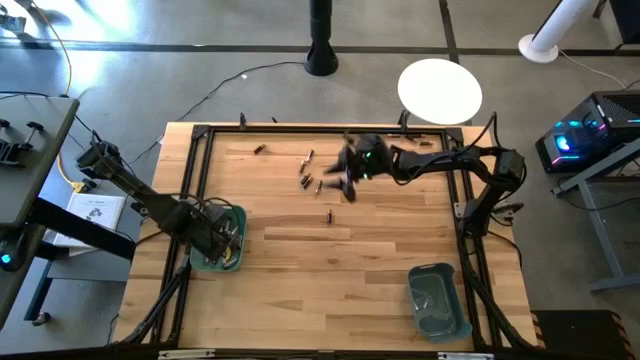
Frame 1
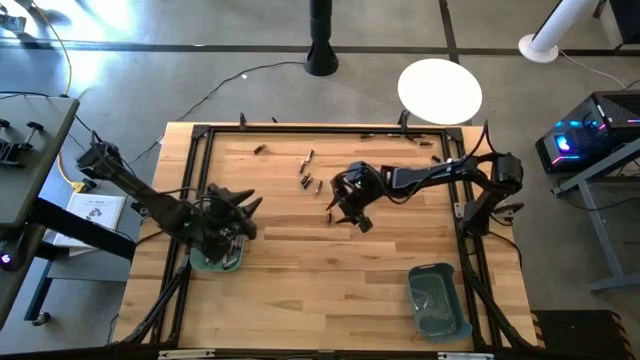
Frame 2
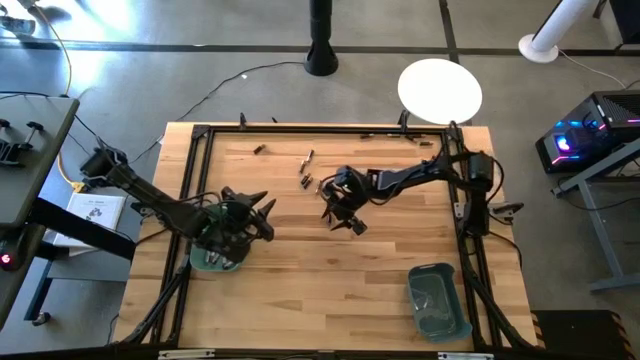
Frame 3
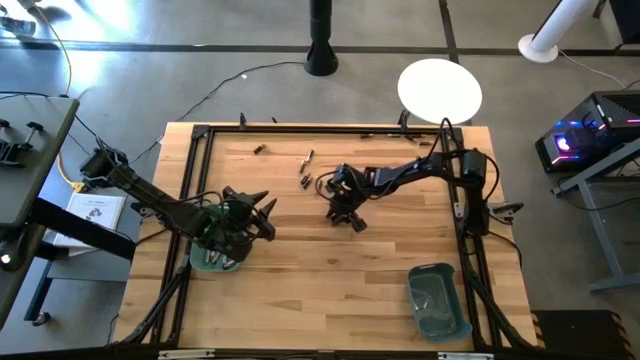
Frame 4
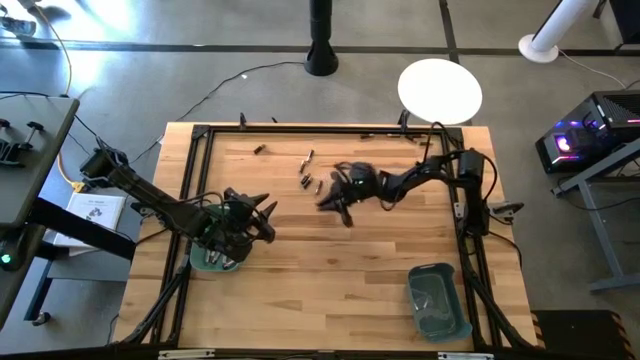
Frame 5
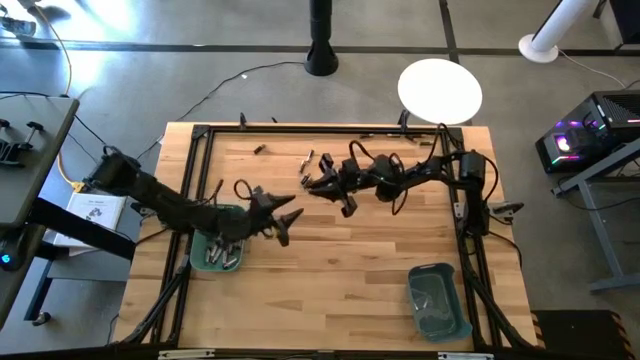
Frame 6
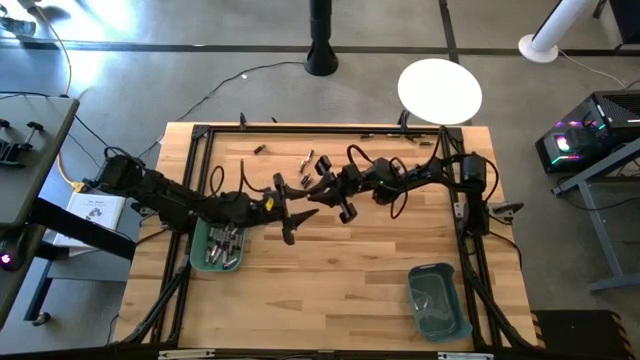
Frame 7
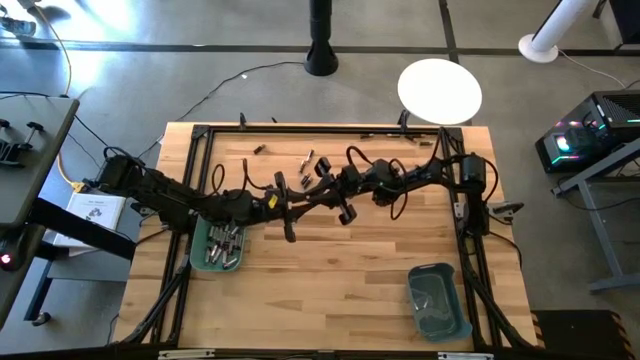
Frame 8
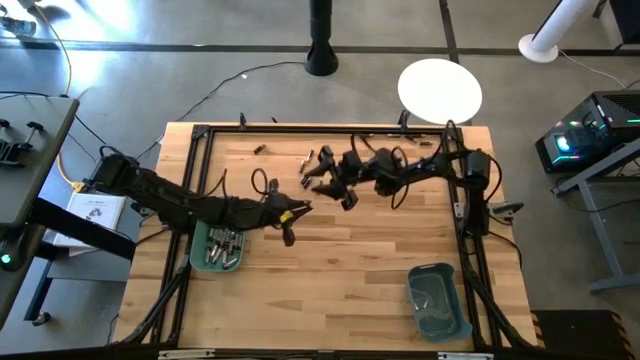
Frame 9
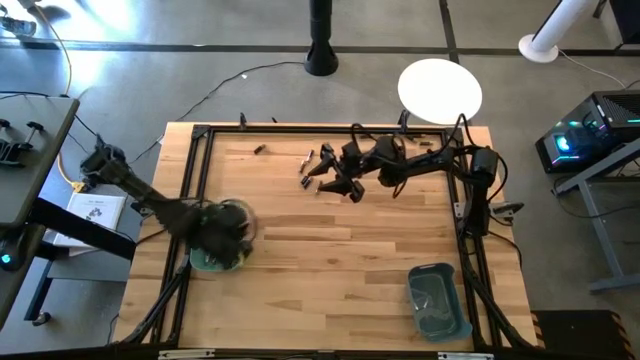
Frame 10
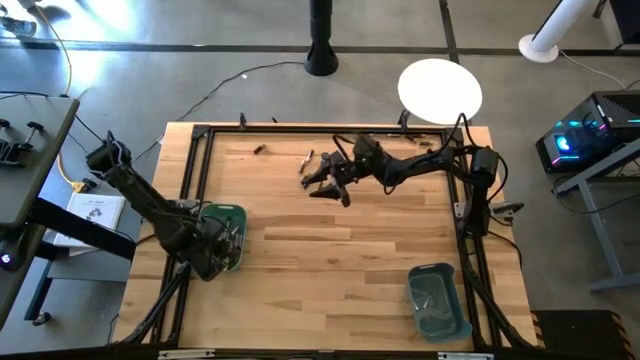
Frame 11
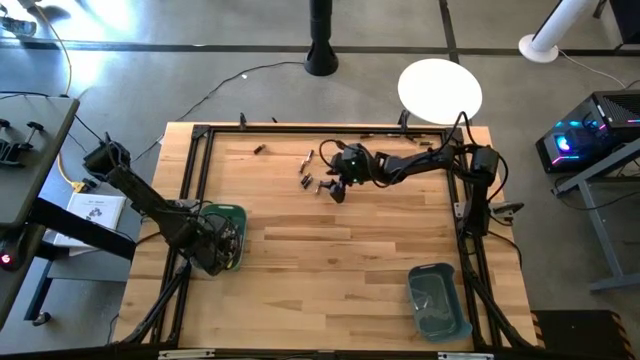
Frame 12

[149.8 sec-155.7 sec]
Task: Sort batteries
Put the black battery into the green bin

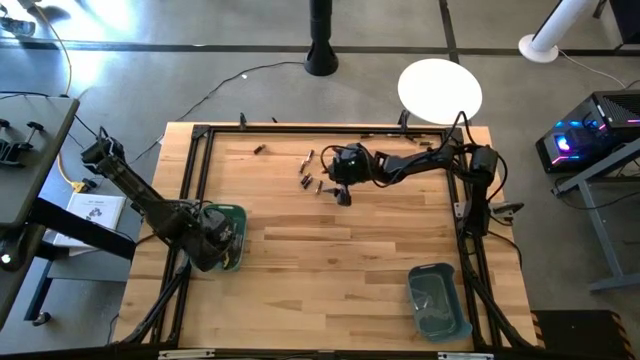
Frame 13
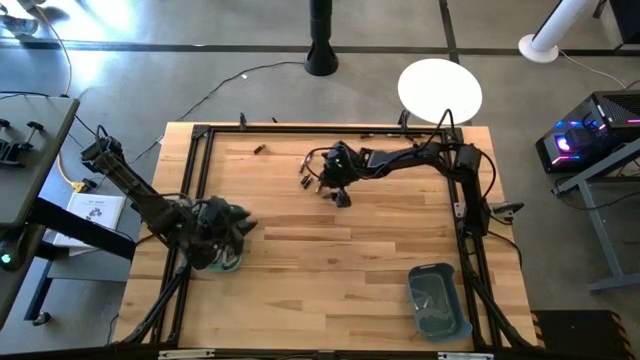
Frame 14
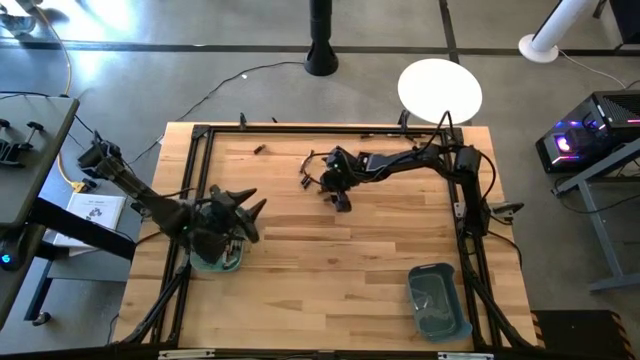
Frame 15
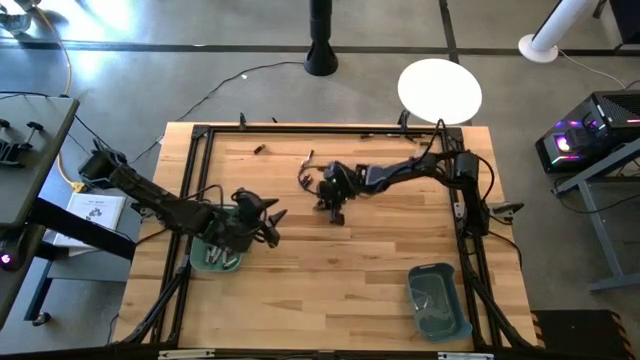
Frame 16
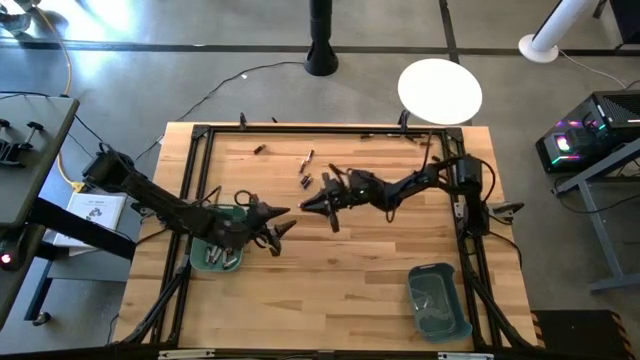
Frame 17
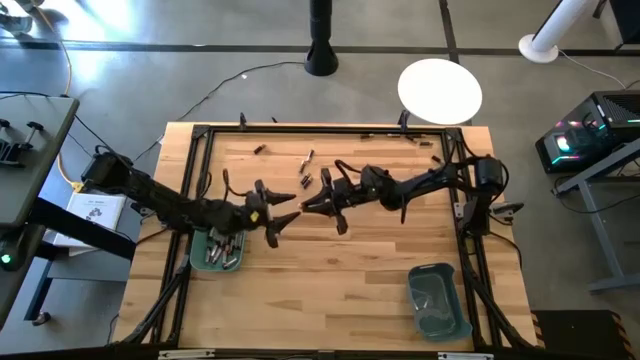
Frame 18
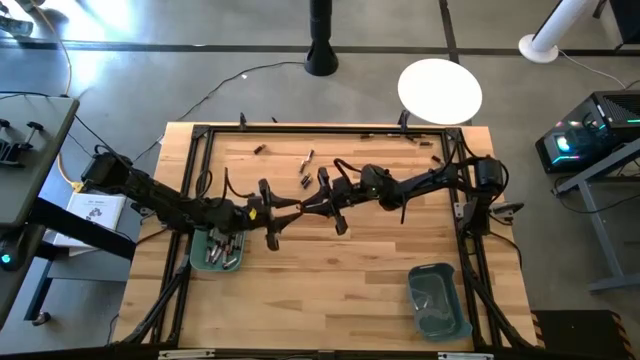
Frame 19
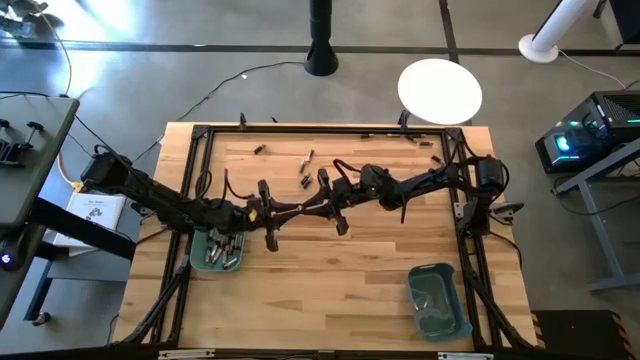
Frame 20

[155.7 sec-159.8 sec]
Put the black battery into the green bin

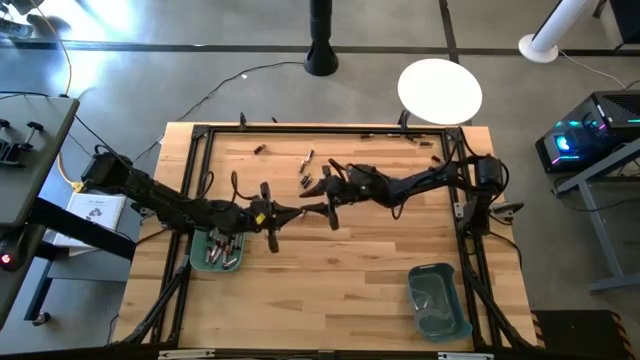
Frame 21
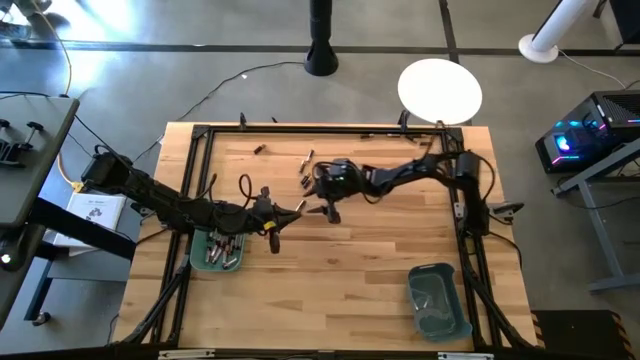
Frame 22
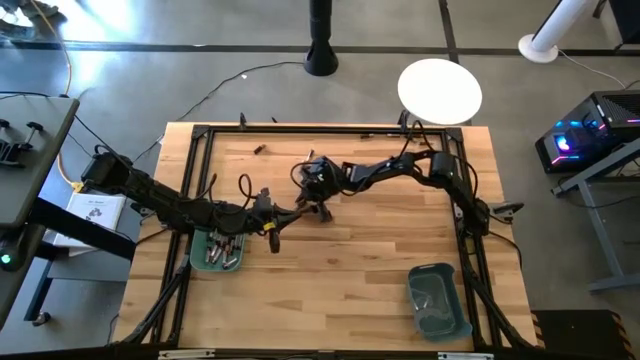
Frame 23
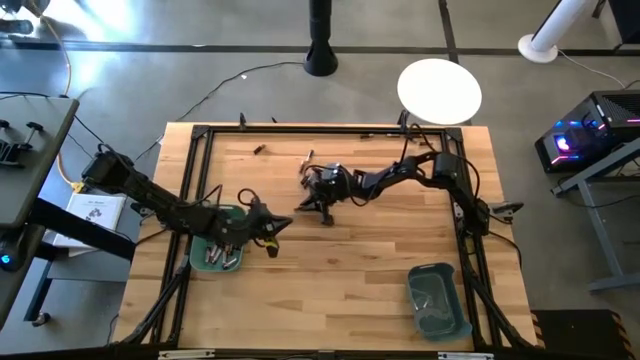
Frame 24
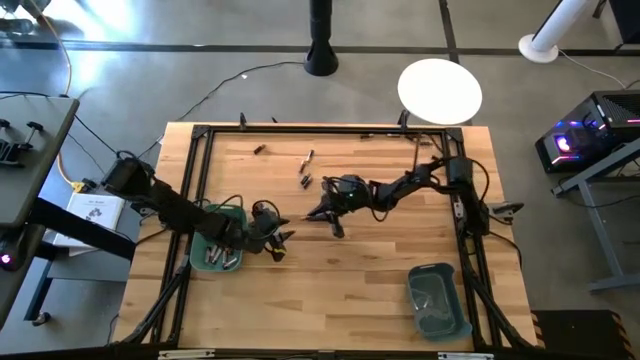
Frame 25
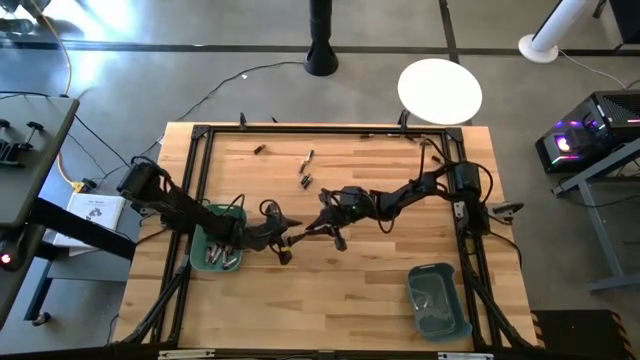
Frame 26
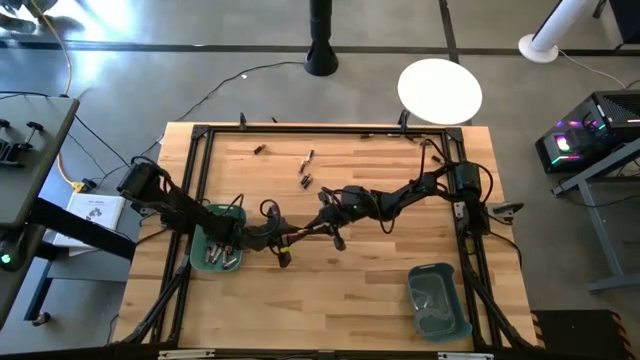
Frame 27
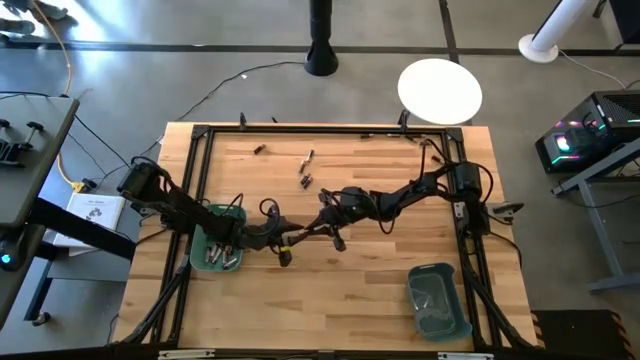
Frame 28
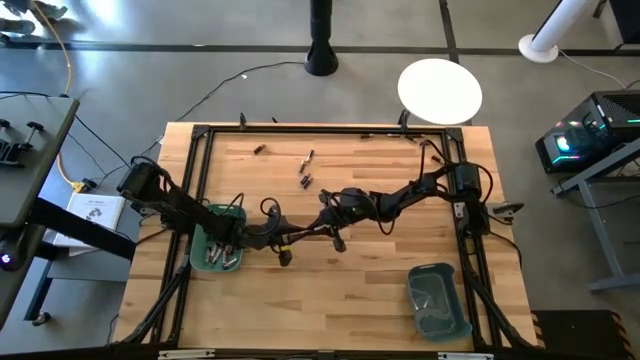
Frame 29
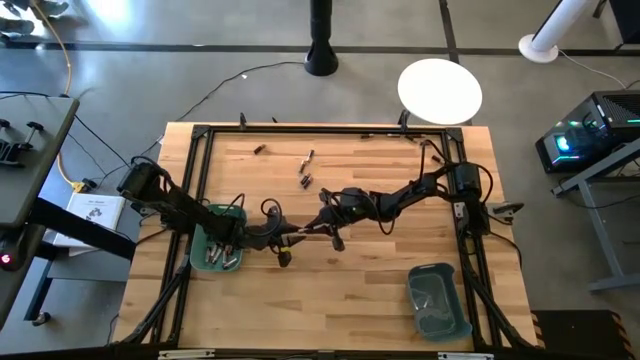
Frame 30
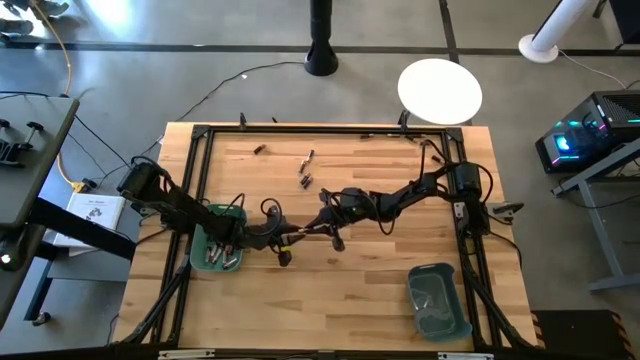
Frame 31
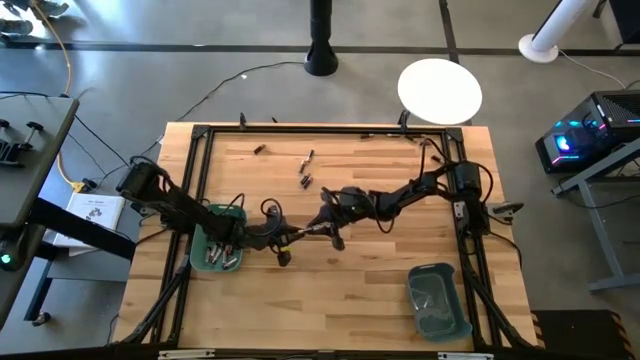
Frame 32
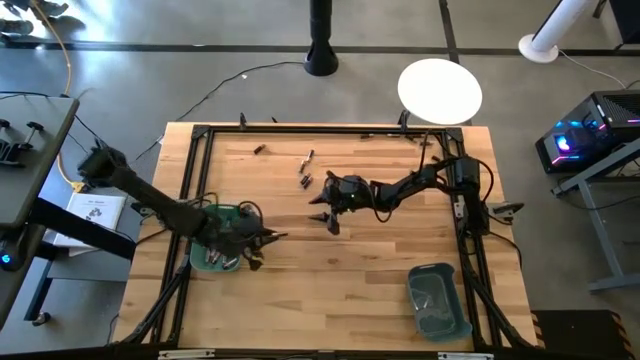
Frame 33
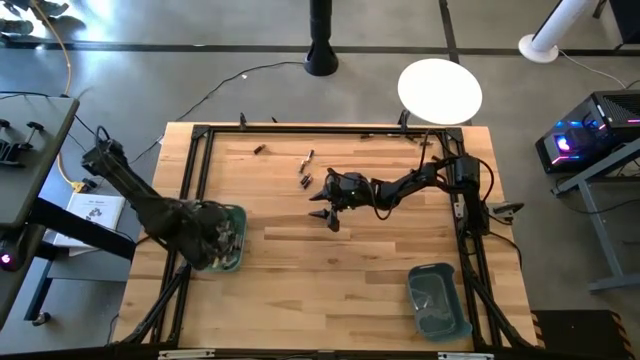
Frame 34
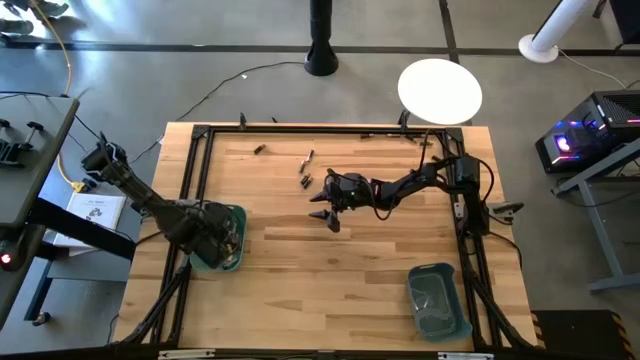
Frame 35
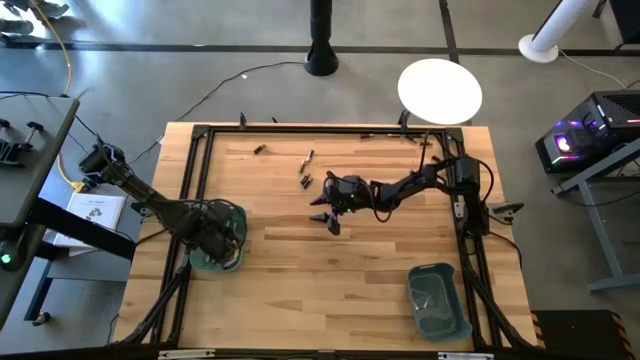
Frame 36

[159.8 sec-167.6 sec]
Put the black battery into the green bin

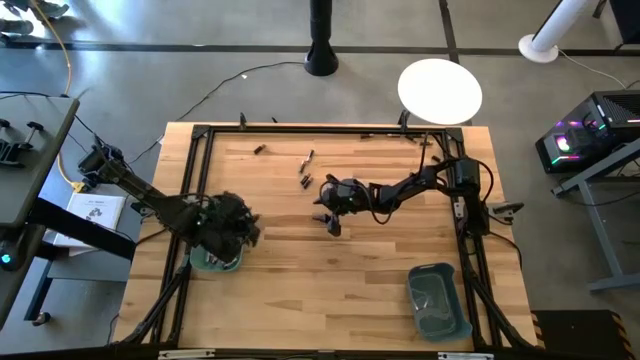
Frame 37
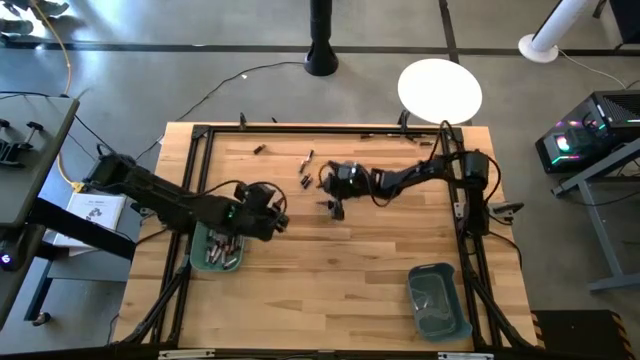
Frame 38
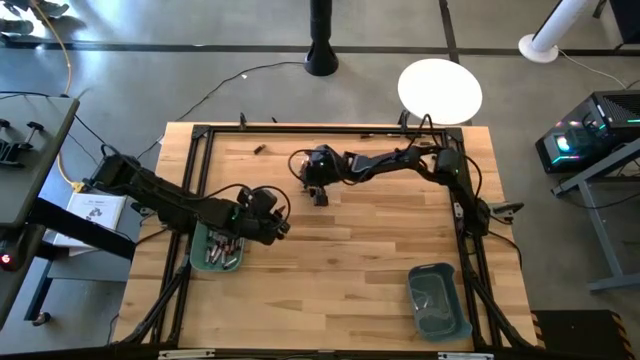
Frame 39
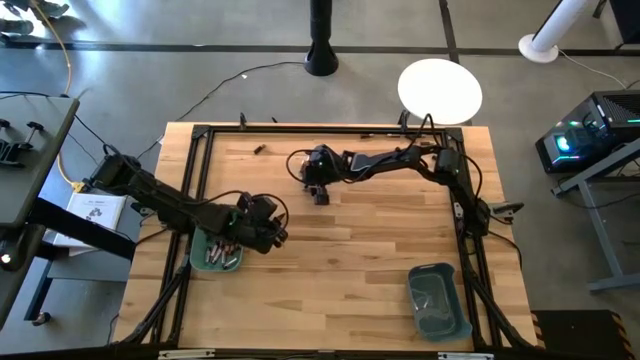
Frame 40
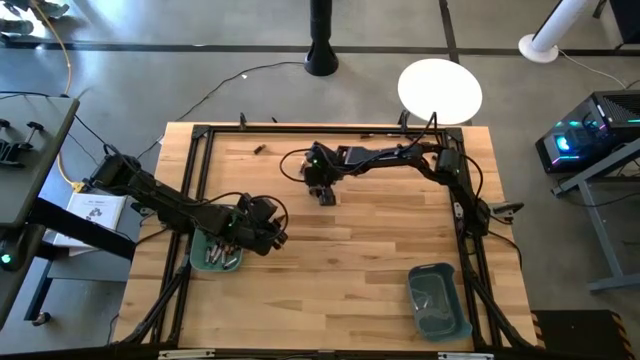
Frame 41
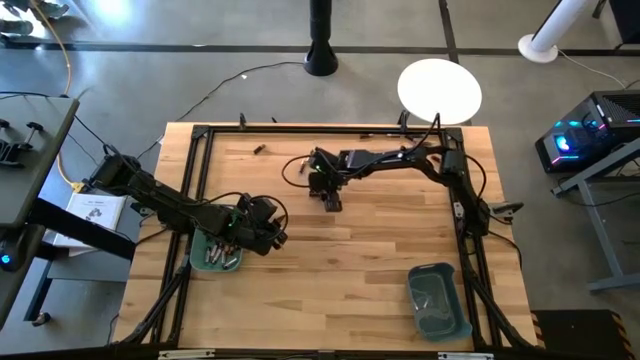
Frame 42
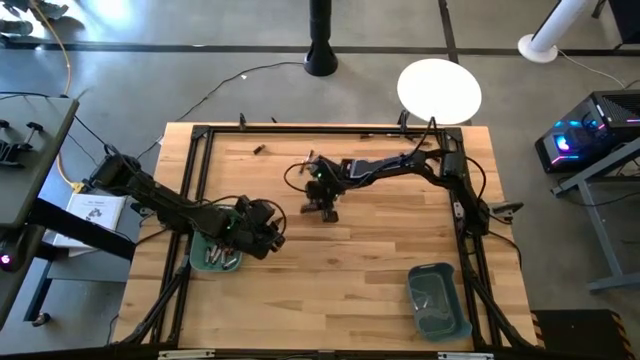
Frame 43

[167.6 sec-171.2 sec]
Put the black battery into the blue bin
